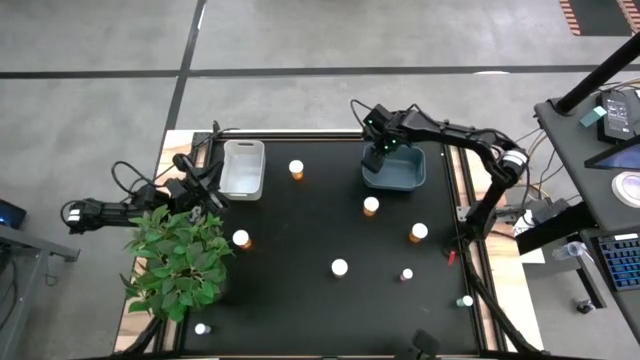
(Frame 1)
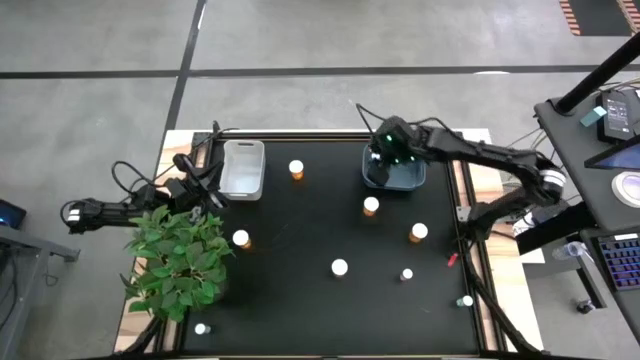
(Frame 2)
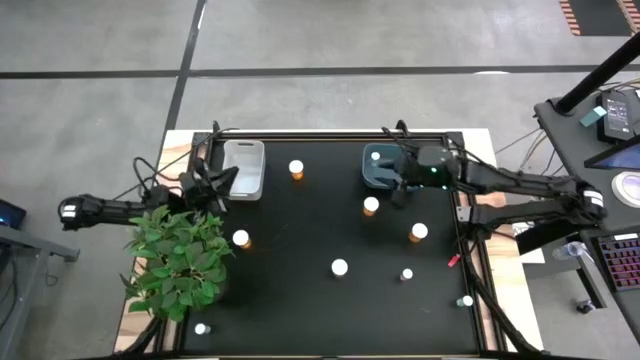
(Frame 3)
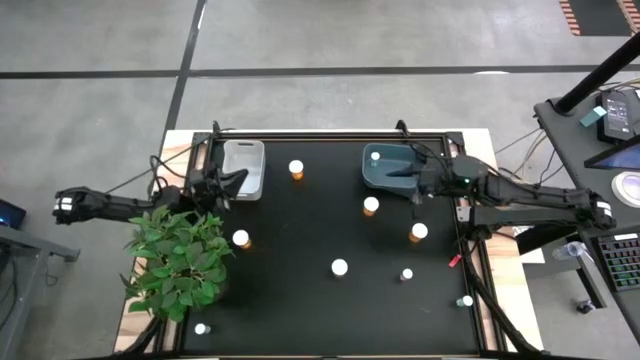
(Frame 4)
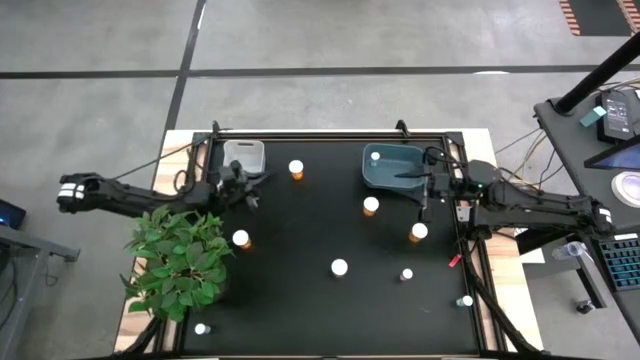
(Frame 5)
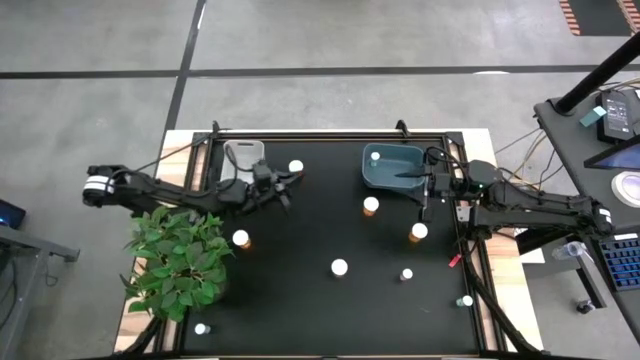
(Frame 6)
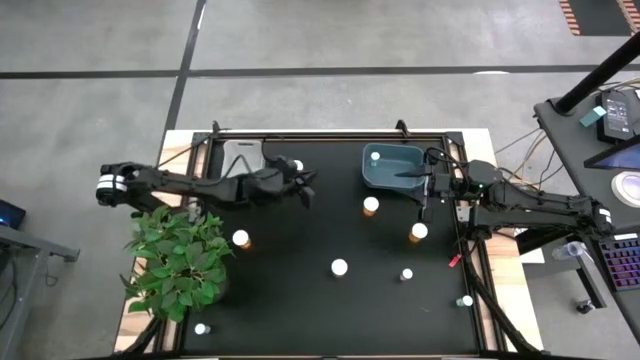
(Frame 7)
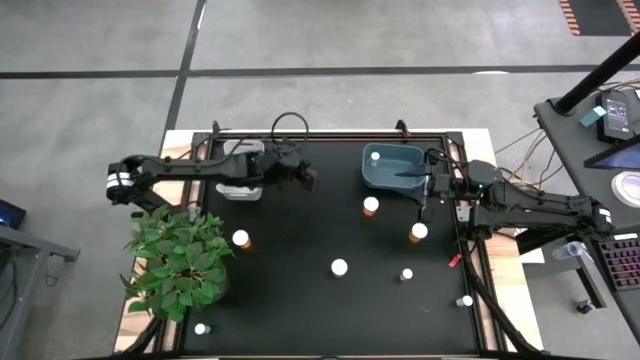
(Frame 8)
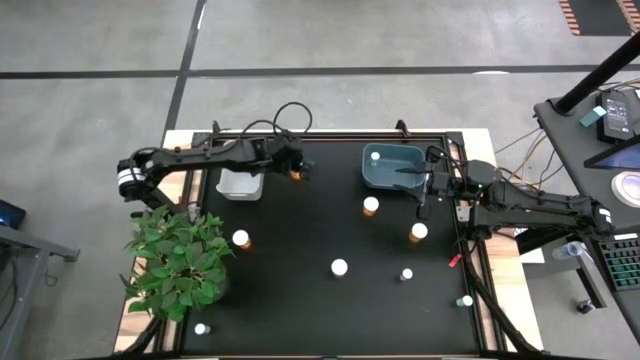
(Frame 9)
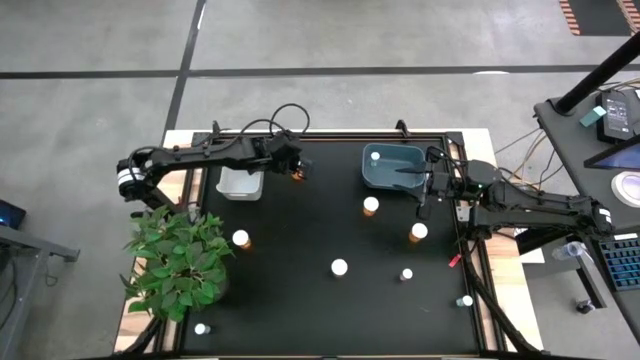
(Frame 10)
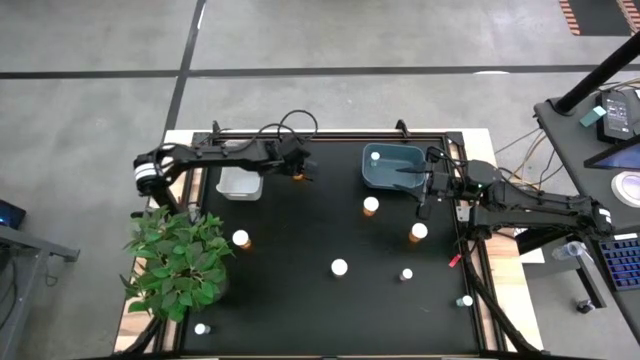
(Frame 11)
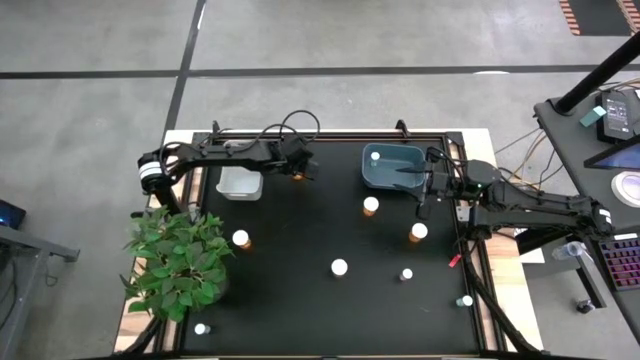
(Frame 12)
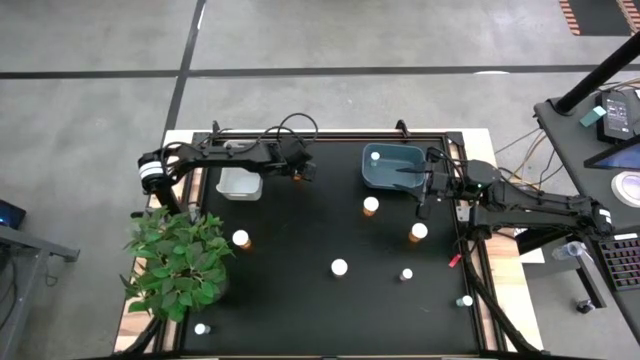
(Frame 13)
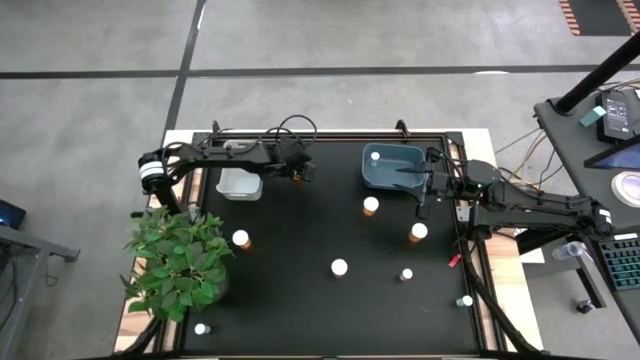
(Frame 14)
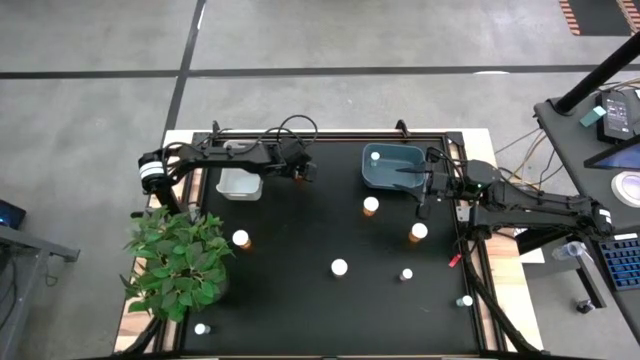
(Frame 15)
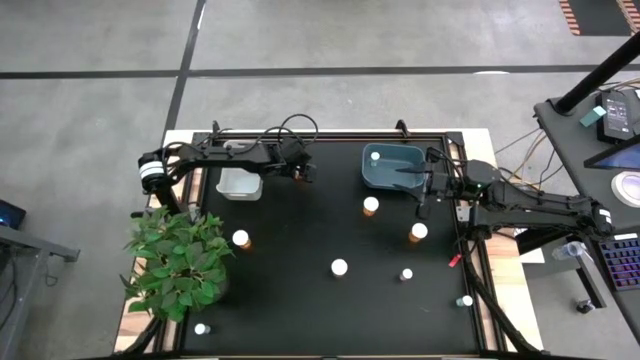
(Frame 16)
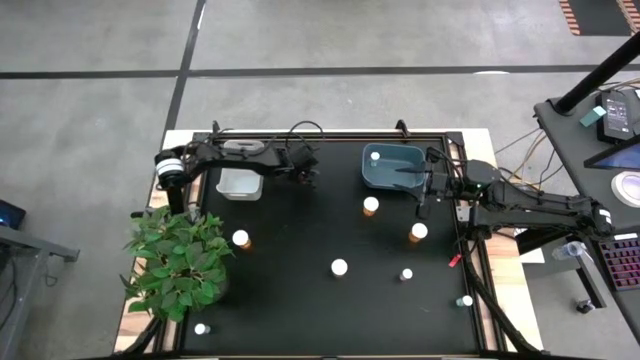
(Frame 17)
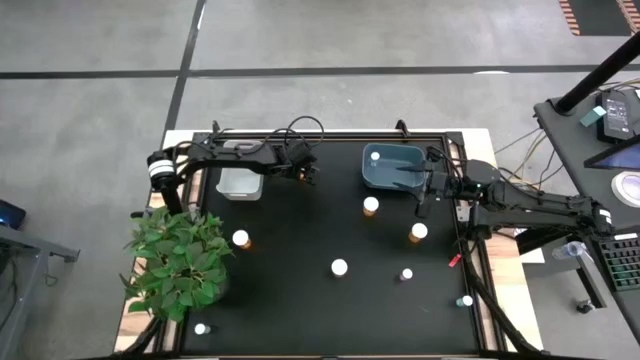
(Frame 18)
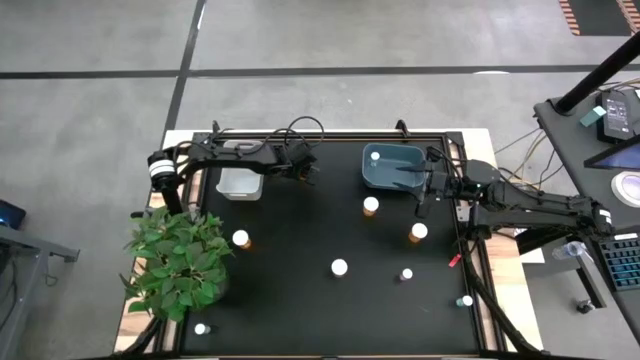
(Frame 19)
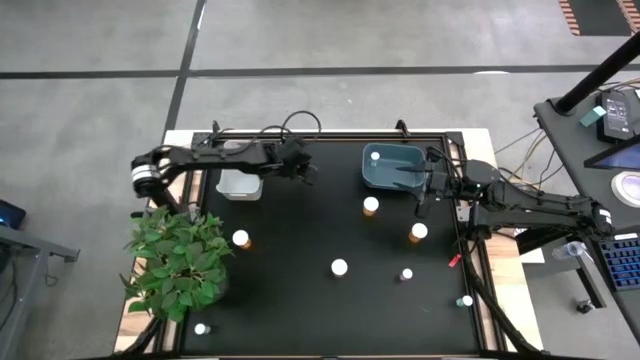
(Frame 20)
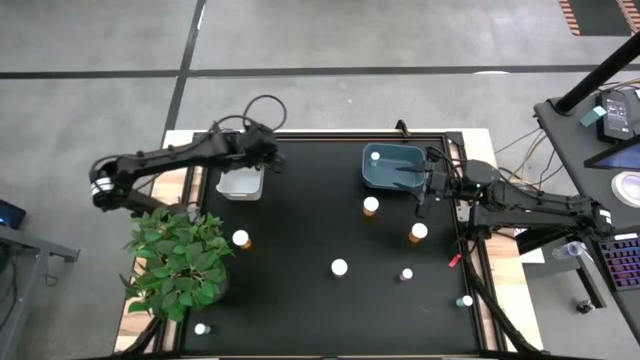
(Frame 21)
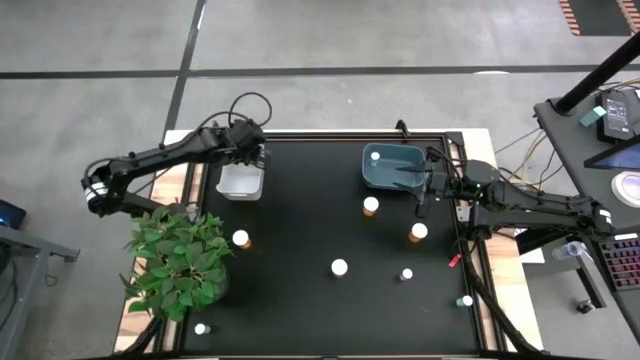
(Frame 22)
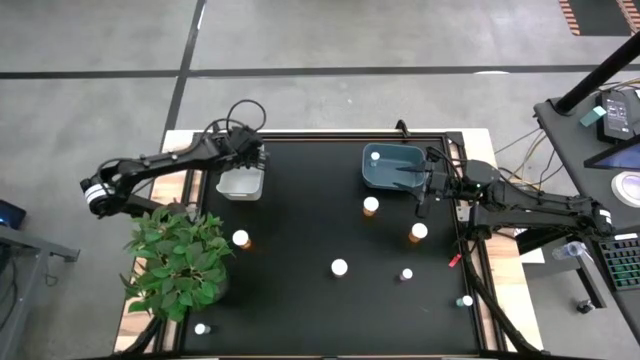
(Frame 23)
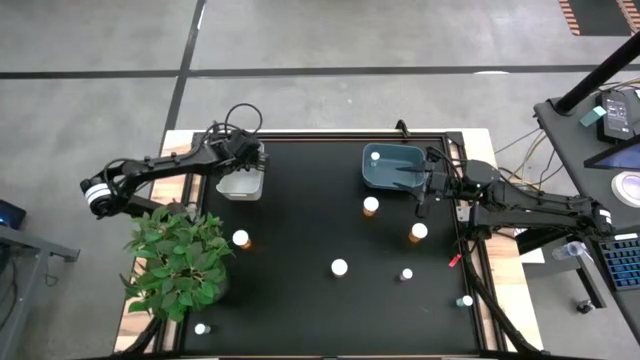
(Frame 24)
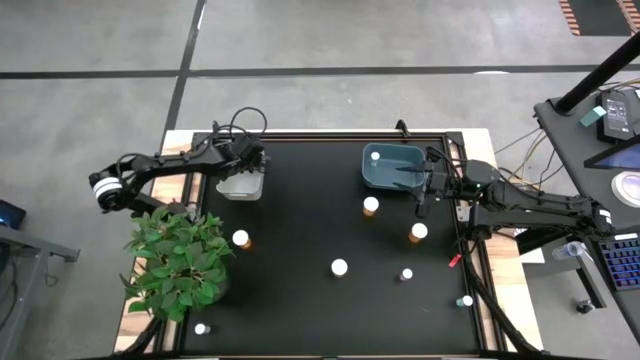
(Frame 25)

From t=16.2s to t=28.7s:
Task: Pick and place medicine bottles into bin by pill shape (circle, oval)
Put the big orange pill bottle into the white bin

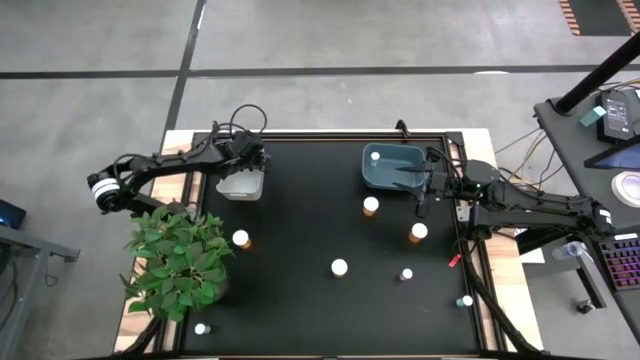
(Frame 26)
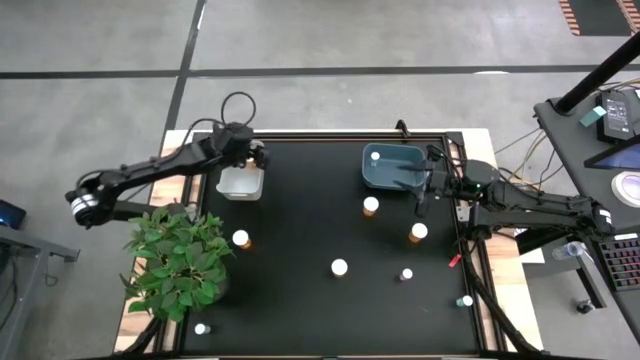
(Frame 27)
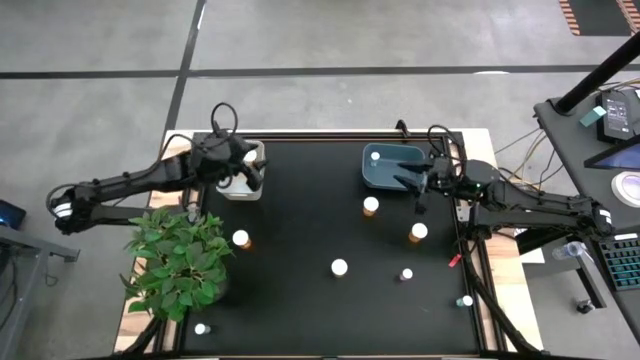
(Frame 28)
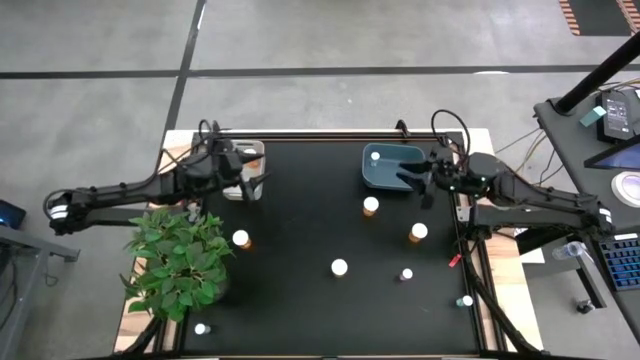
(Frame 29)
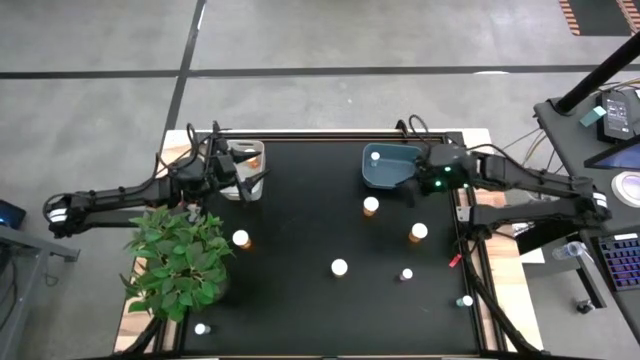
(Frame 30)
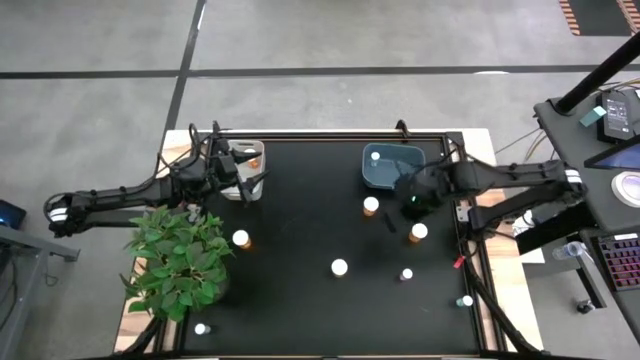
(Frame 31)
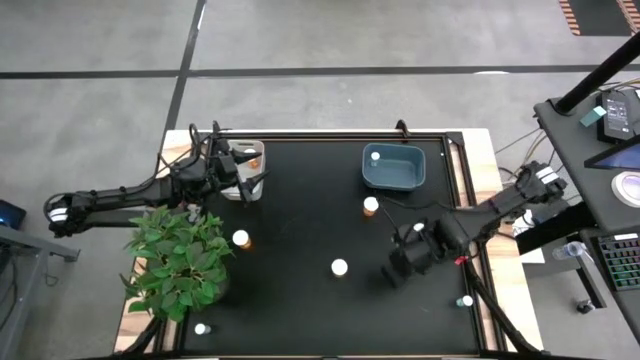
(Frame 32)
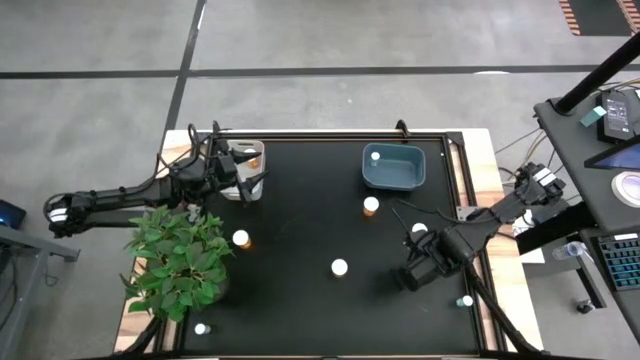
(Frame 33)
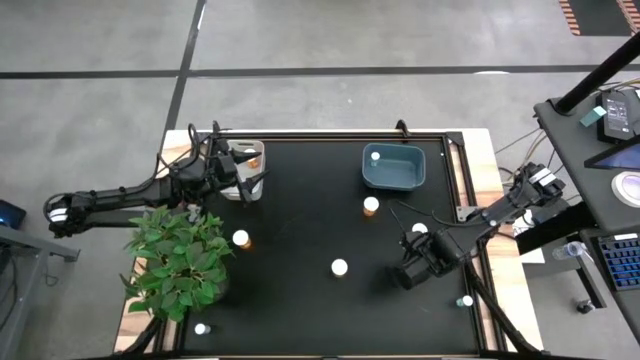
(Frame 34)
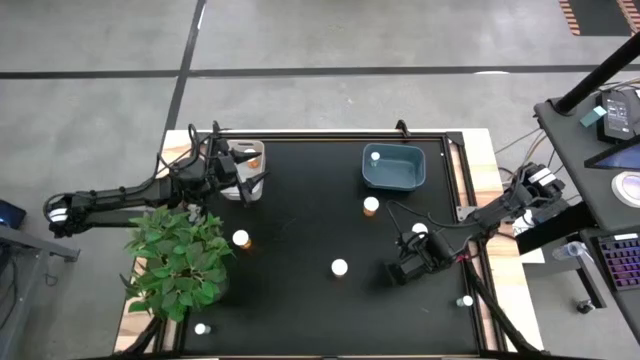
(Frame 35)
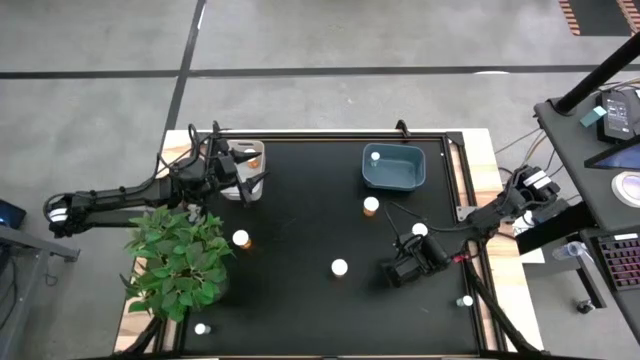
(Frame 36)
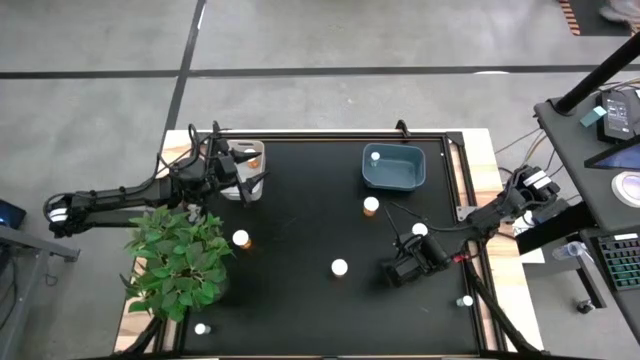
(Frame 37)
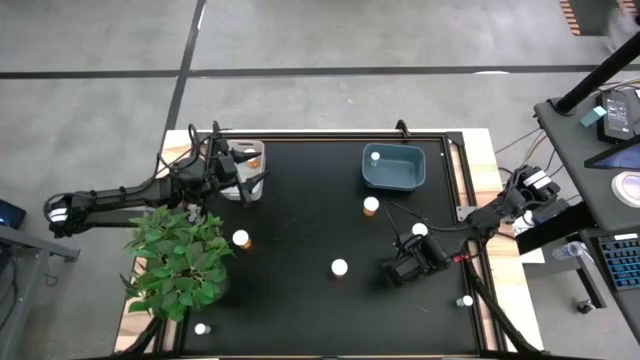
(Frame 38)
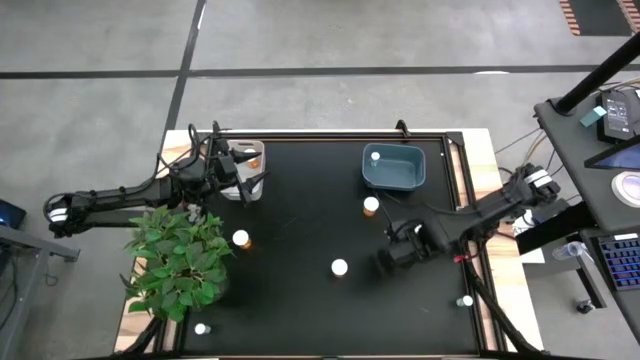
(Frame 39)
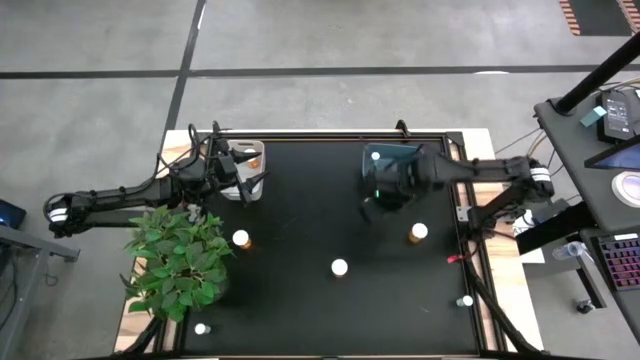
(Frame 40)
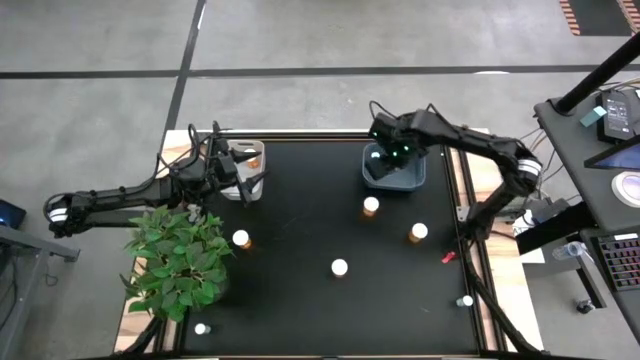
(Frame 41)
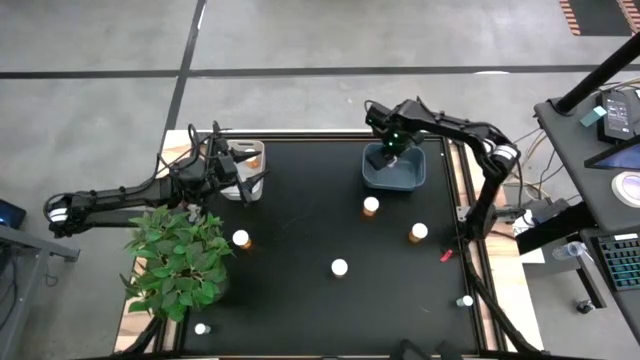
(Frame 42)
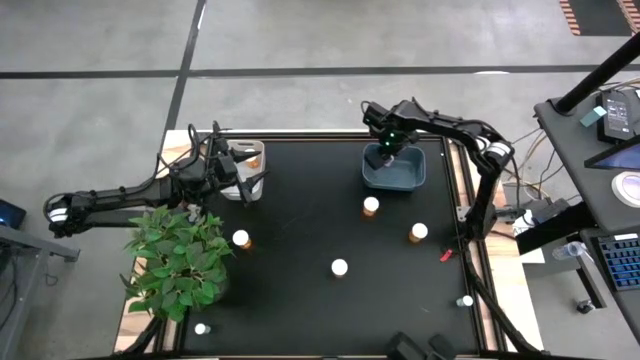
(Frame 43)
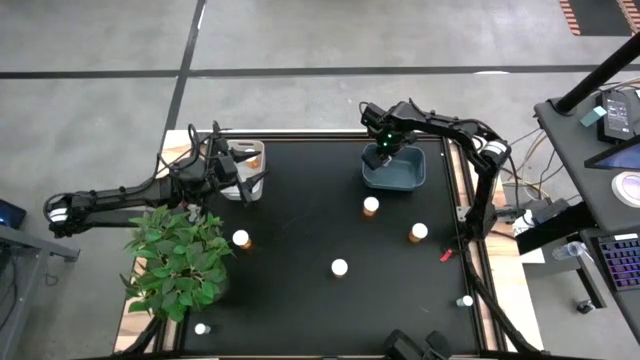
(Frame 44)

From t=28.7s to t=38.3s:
Put the small pink pill bottle into the blue bin
